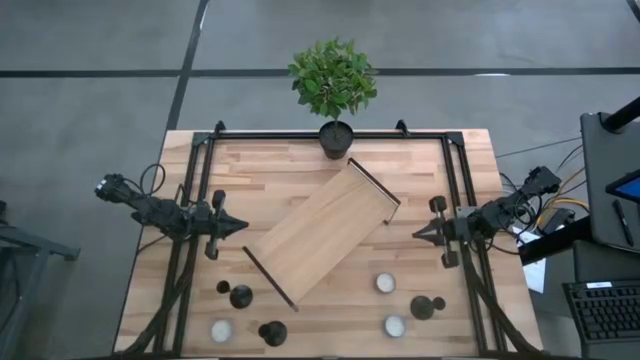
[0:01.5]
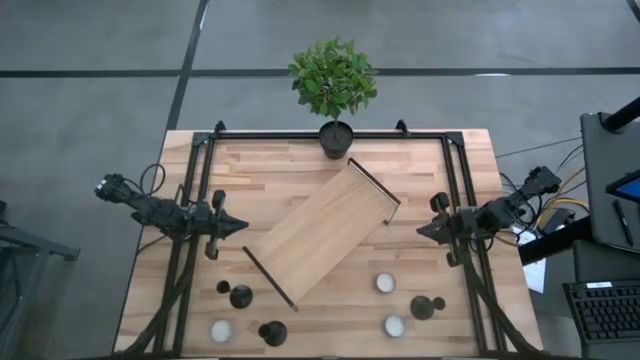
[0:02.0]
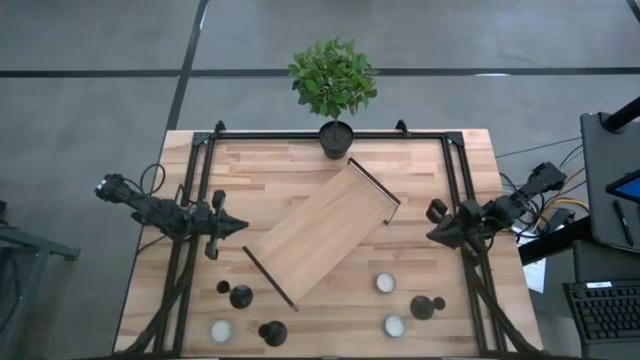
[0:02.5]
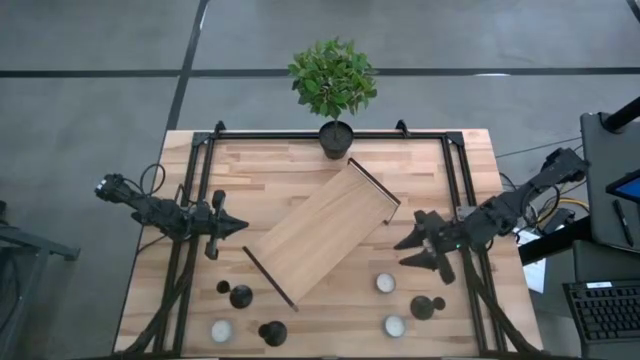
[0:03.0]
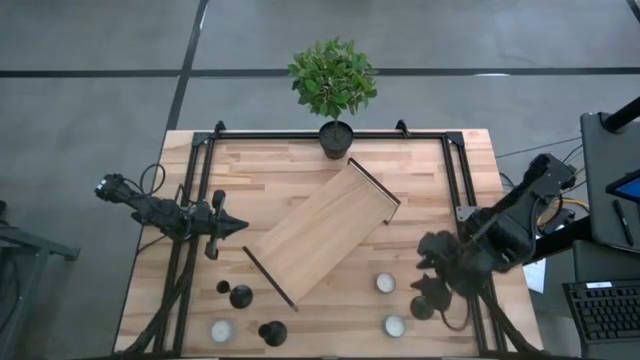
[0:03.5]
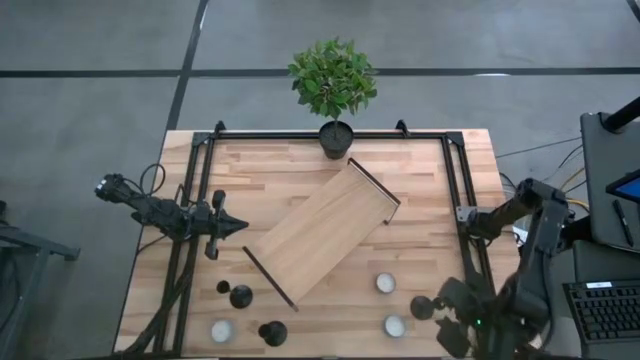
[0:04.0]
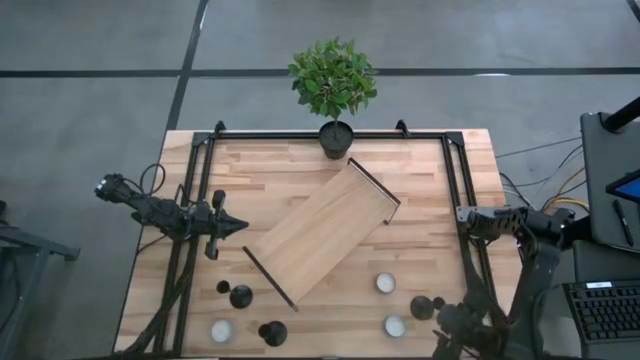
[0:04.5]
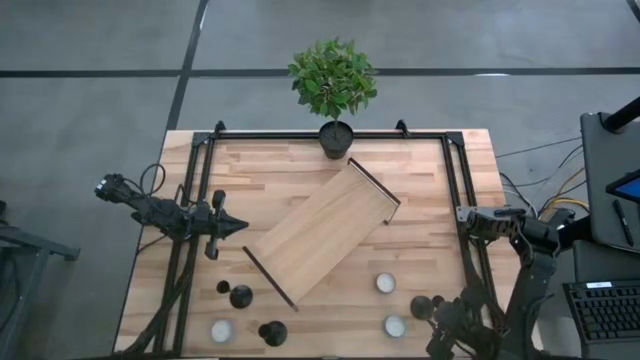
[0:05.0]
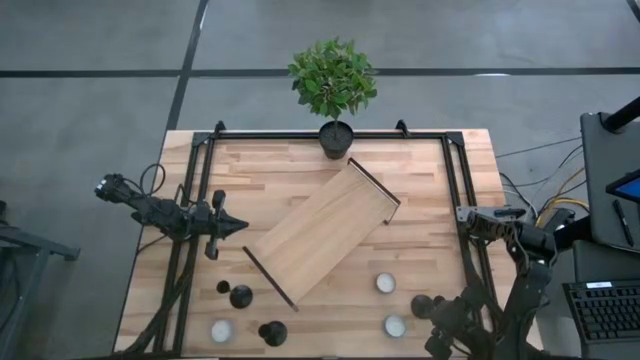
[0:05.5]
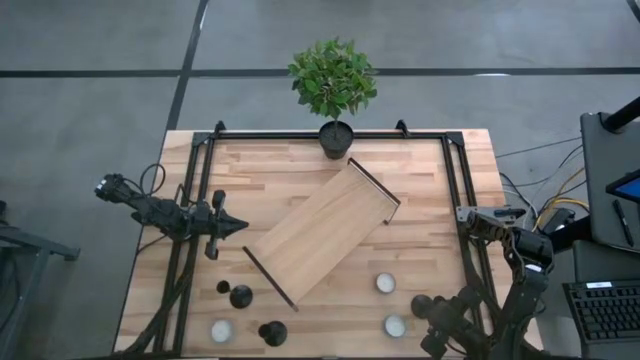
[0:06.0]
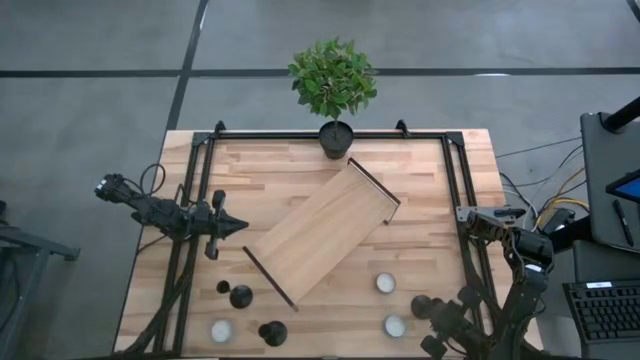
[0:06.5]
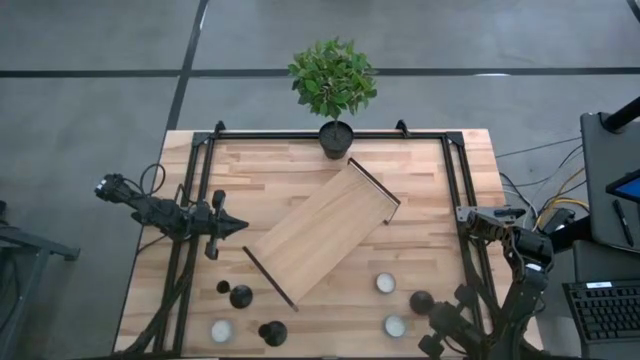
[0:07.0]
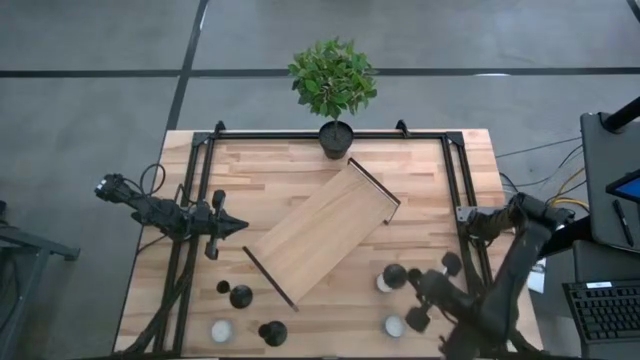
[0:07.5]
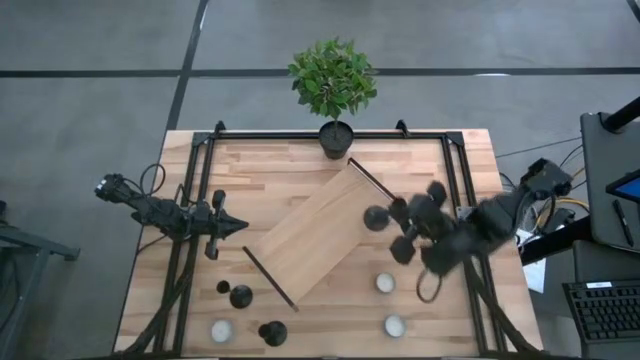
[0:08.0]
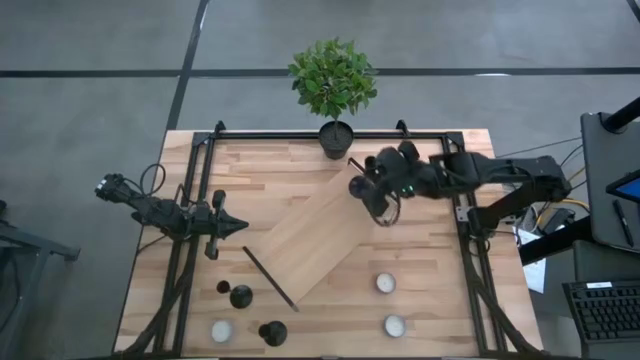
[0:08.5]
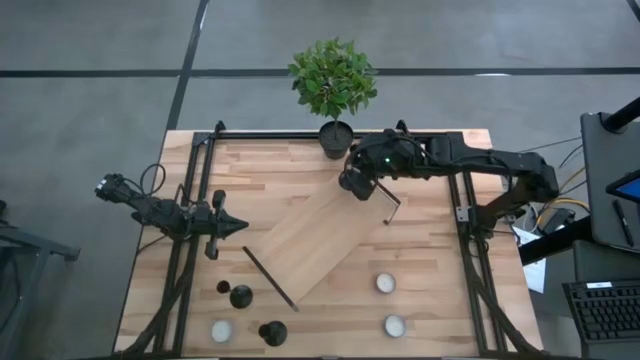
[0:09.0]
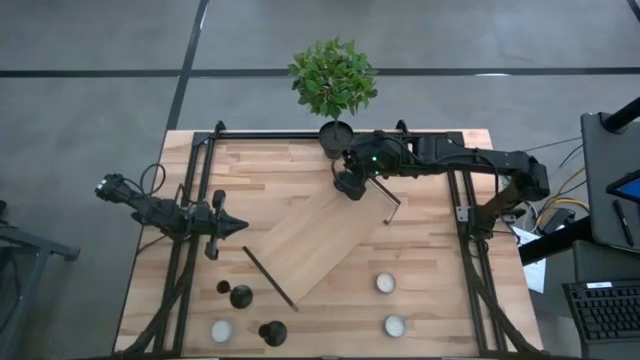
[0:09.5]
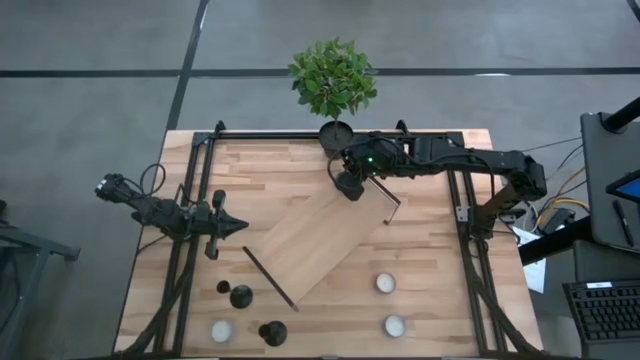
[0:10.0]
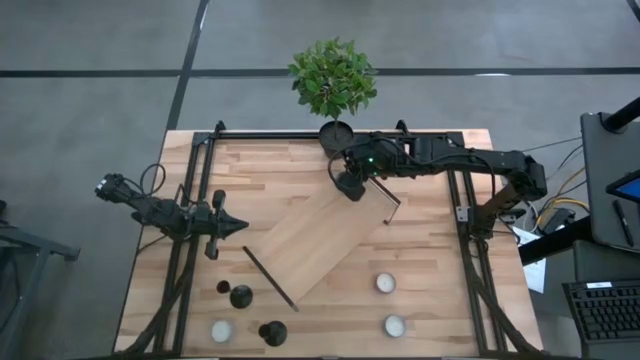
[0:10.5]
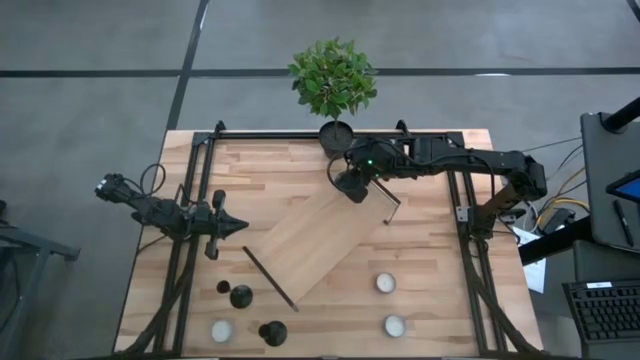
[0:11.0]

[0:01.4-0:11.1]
Task: Pick & Place candle stick holders
Put the top right black candle holder on the shelf

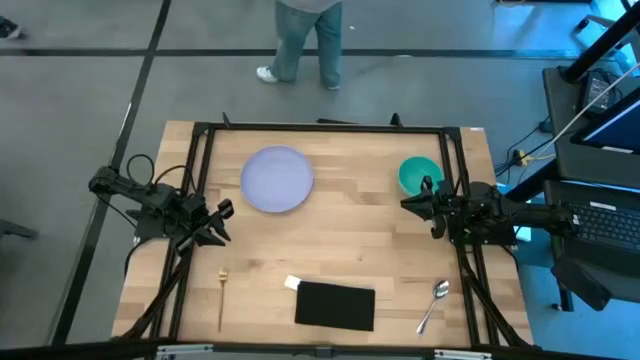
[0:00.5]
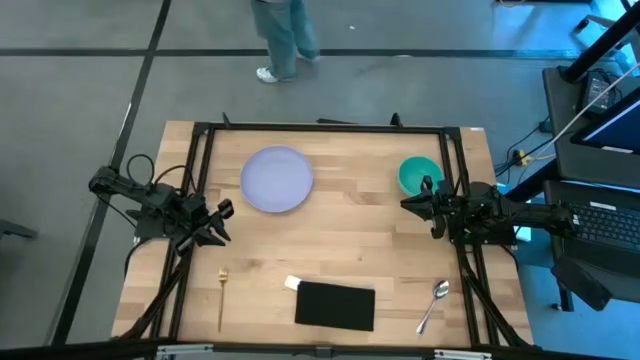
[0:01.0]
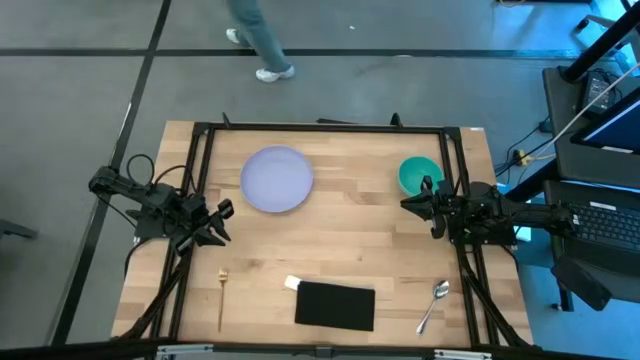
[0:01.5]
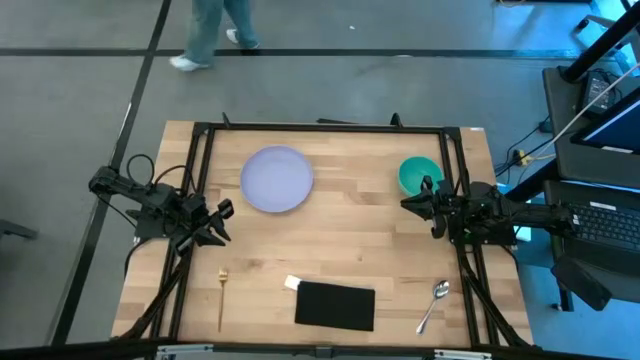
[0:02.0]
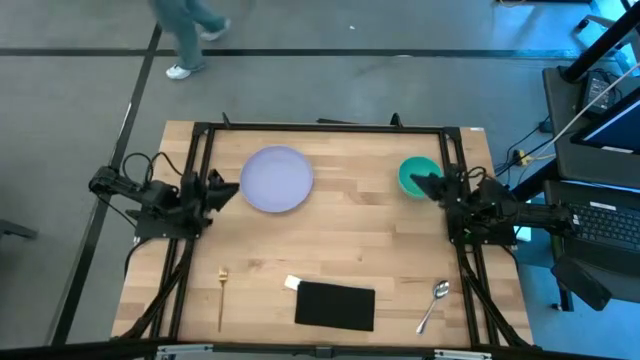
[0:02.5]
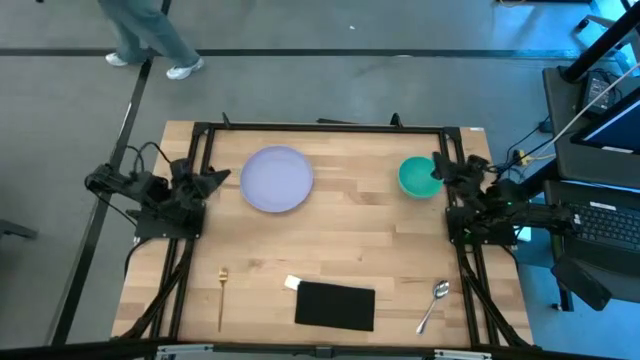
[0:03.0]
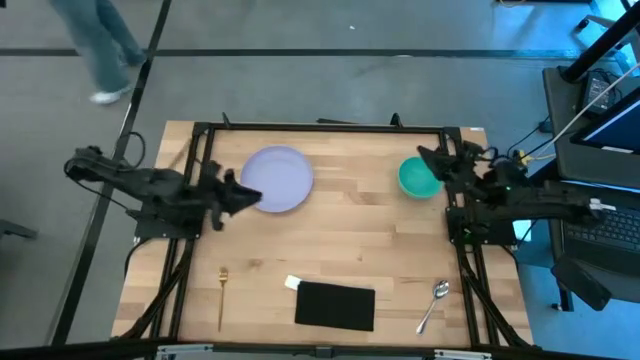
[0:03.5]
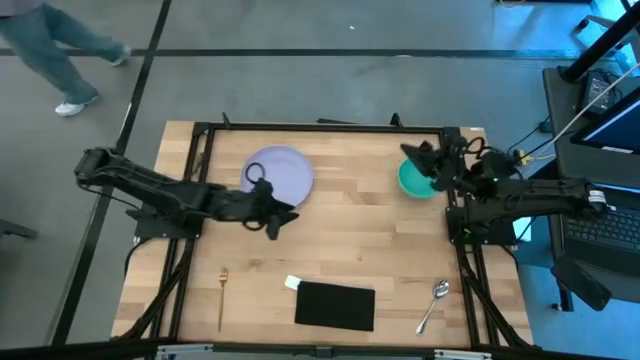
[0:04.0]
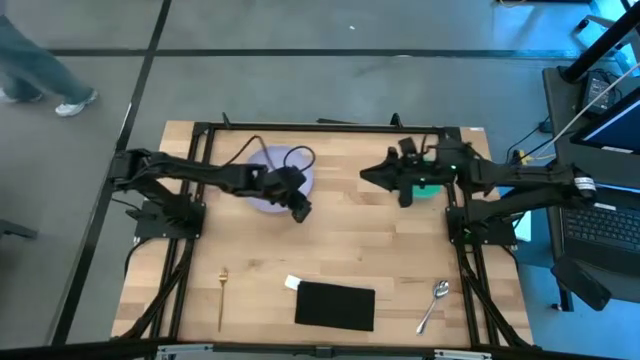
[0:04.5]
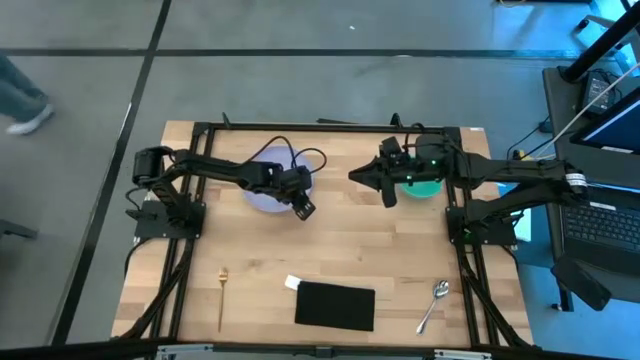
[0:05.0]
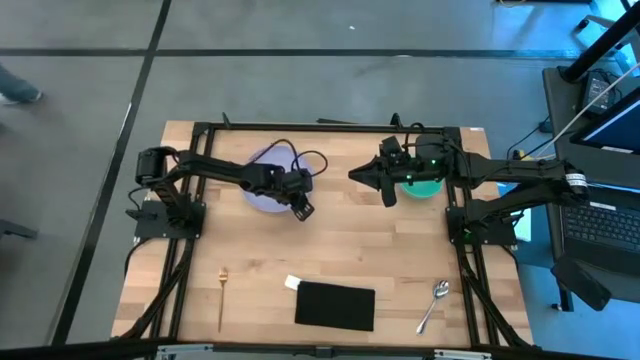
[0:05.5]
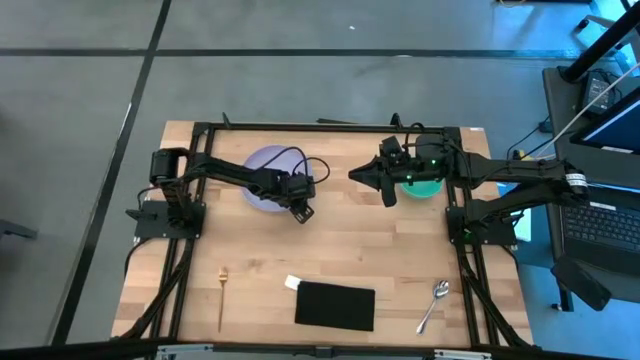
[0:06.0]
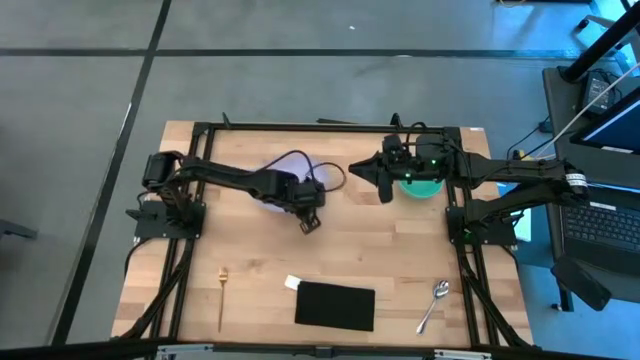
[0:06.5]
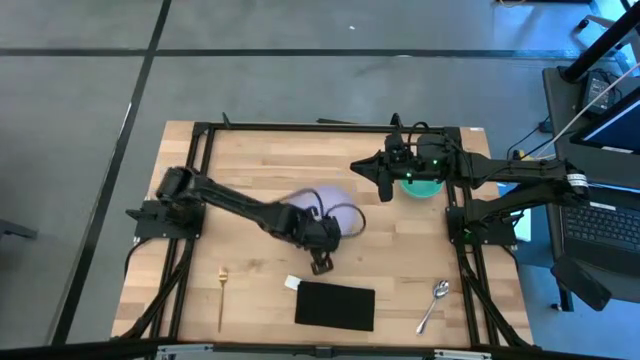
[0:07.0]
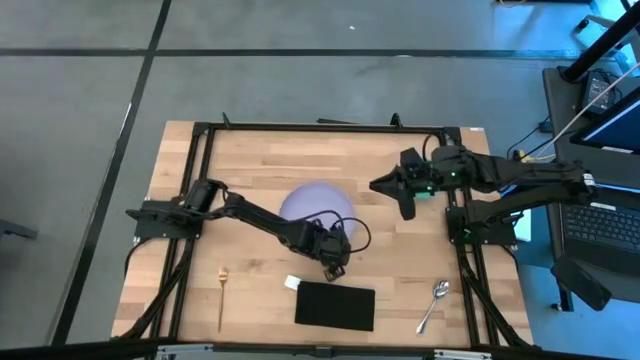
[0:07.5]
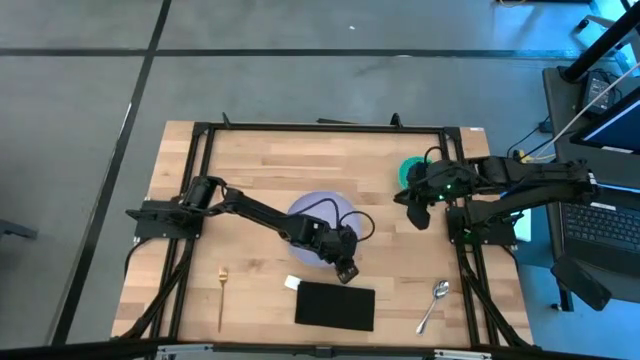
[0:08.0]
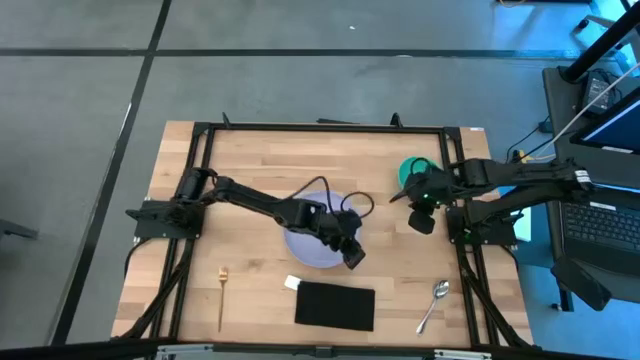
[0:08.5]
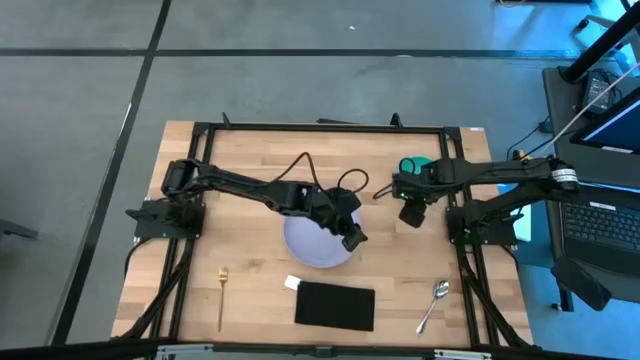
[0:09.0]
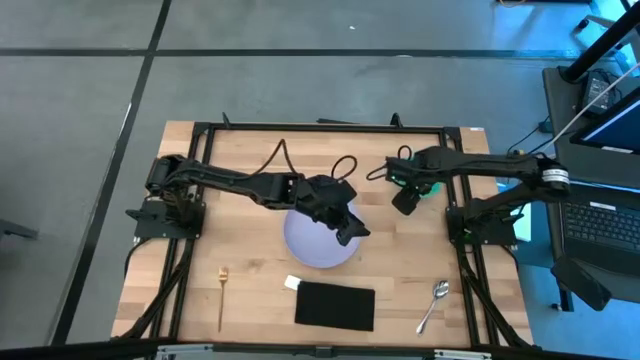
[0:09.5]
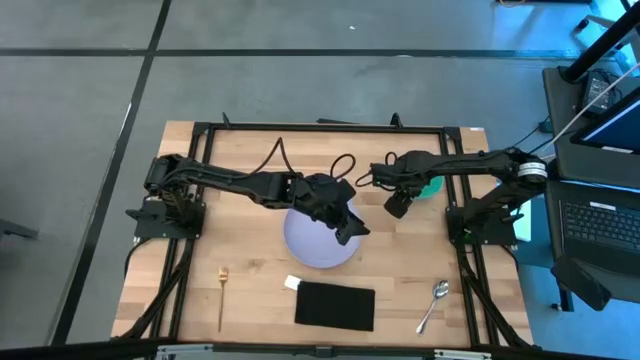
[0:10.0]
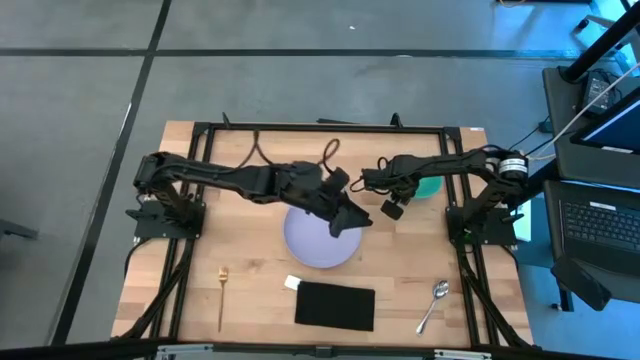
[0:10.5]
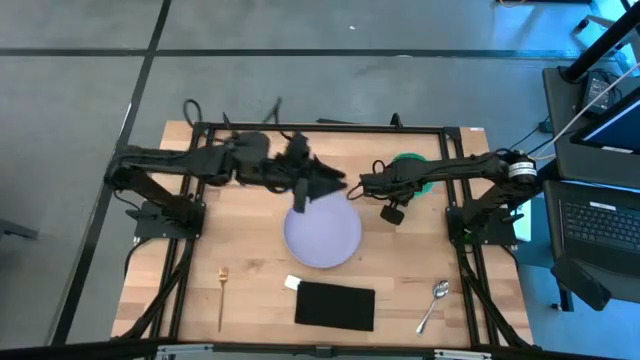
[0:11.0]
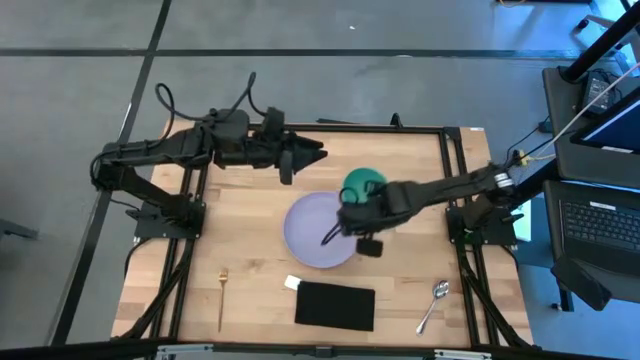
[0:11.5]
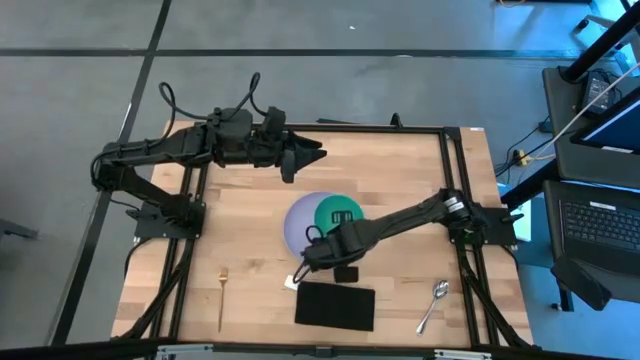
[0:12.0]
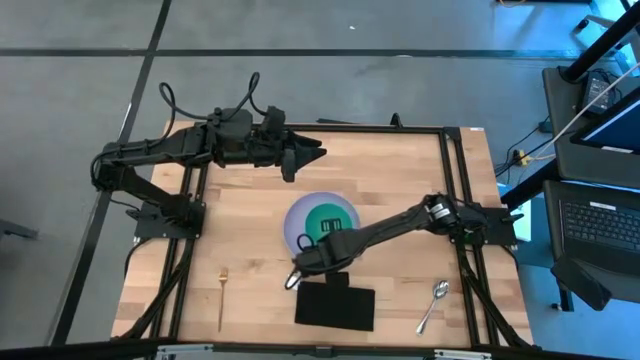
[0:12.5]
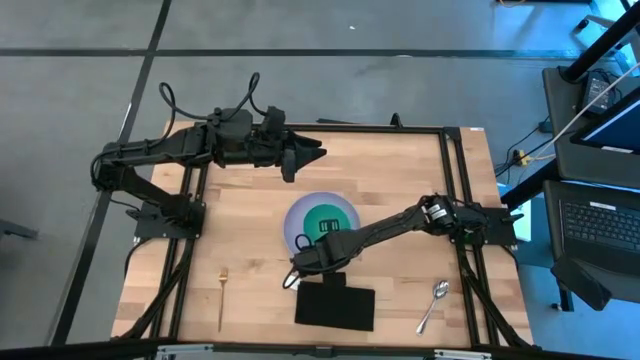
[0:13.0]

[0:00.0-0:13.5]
Task: Set table place
Stack the green bowl on top of the purple plate
